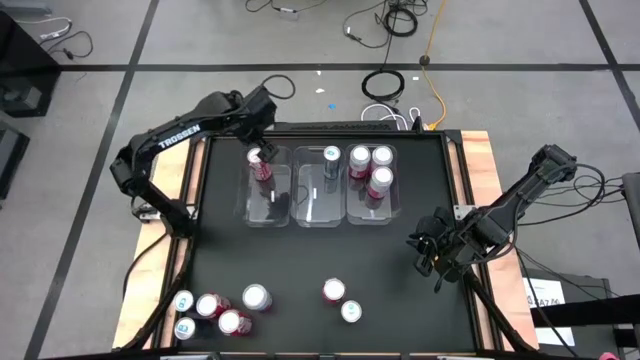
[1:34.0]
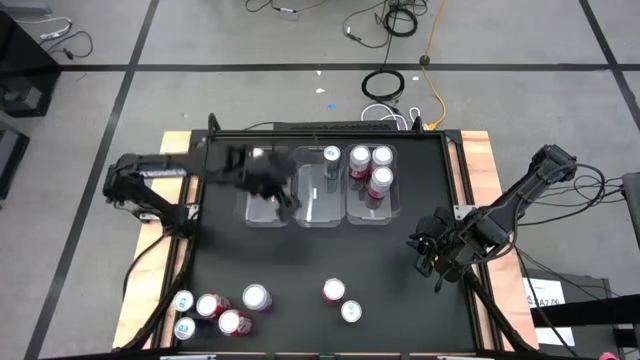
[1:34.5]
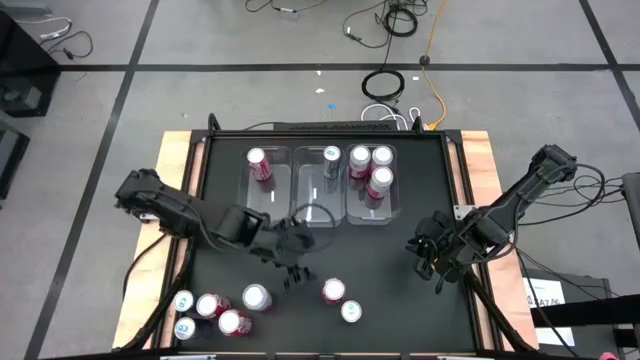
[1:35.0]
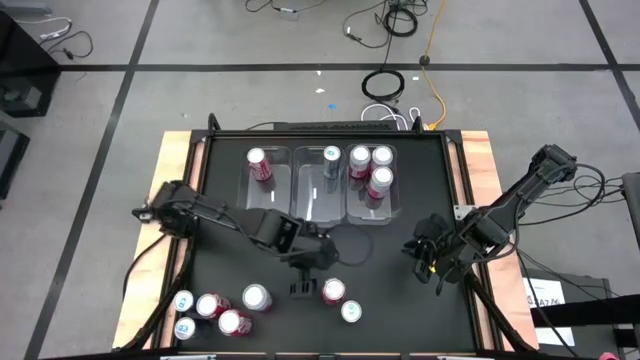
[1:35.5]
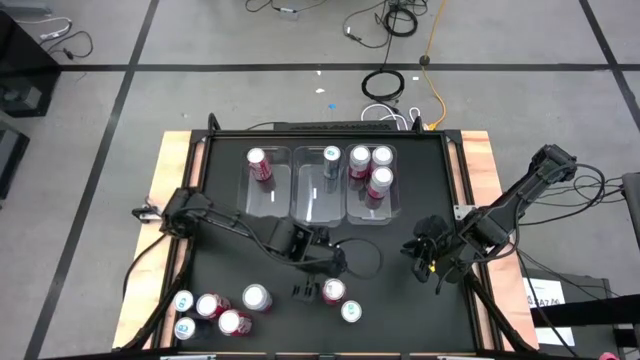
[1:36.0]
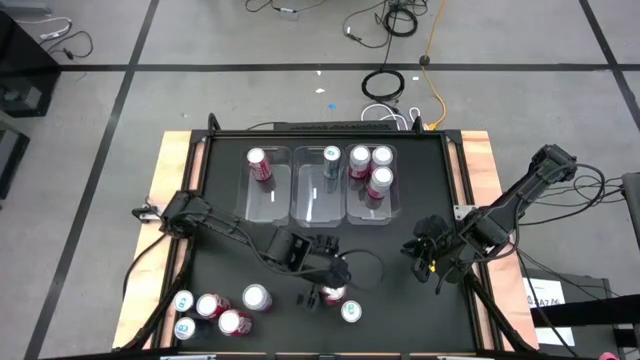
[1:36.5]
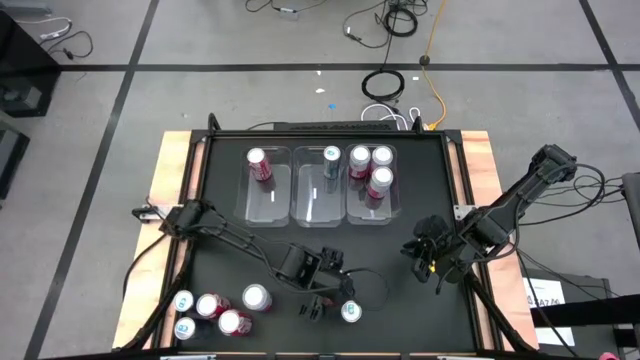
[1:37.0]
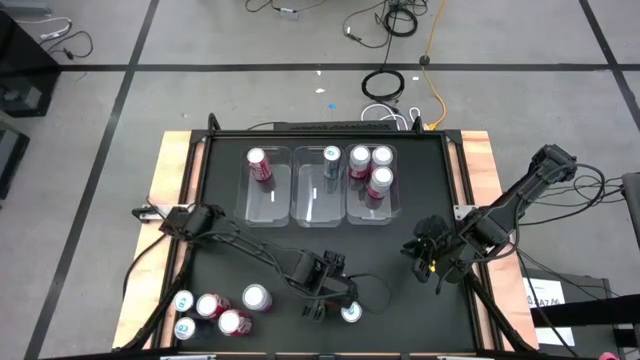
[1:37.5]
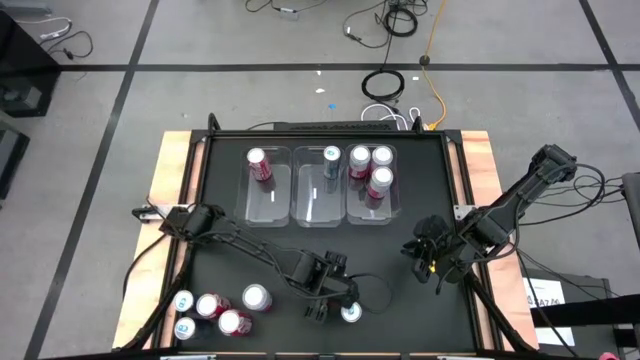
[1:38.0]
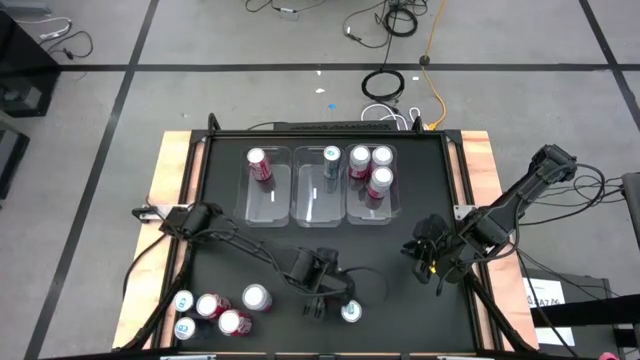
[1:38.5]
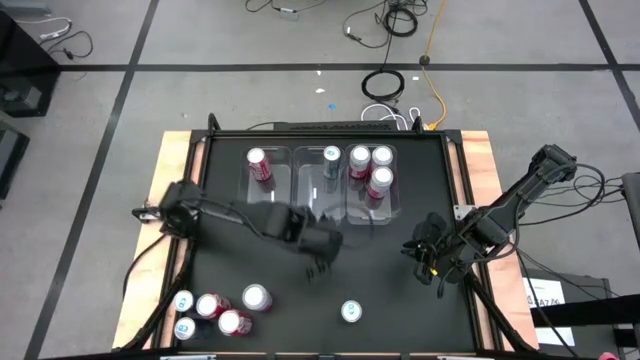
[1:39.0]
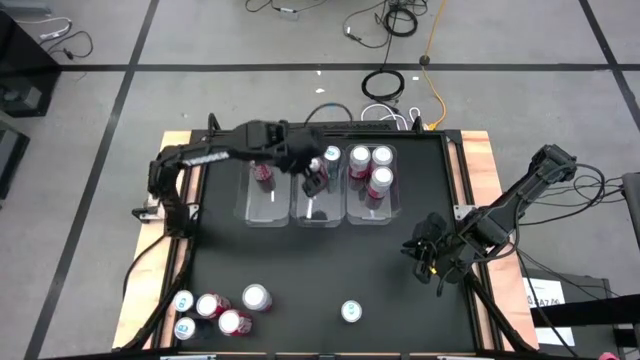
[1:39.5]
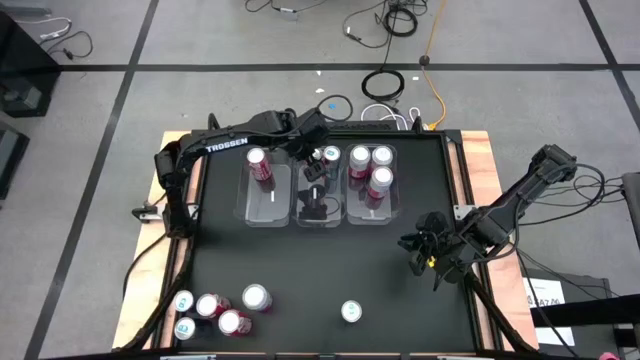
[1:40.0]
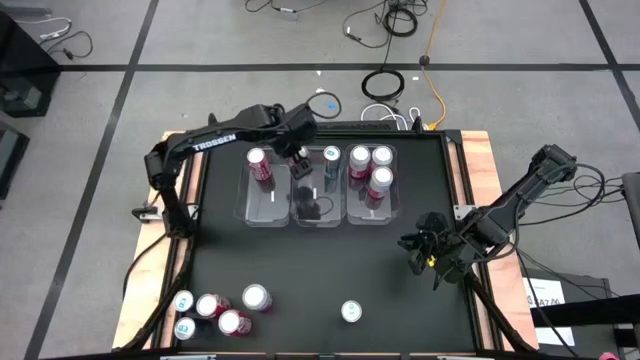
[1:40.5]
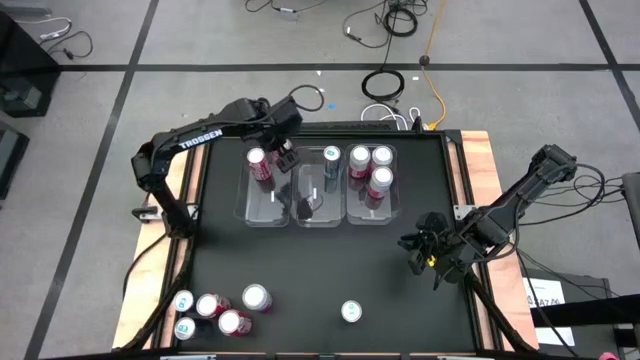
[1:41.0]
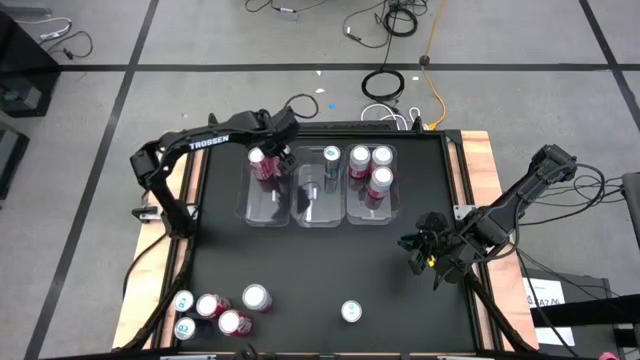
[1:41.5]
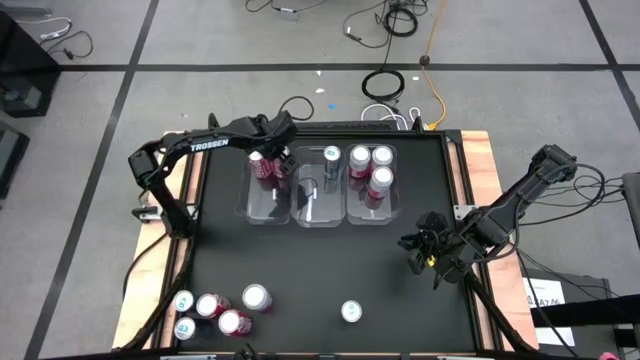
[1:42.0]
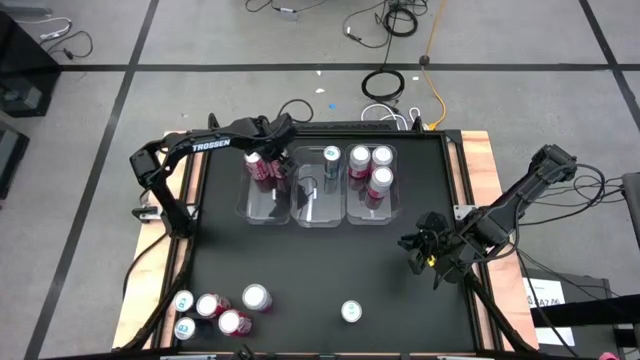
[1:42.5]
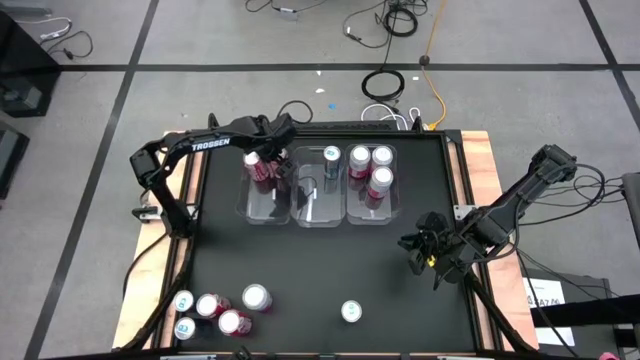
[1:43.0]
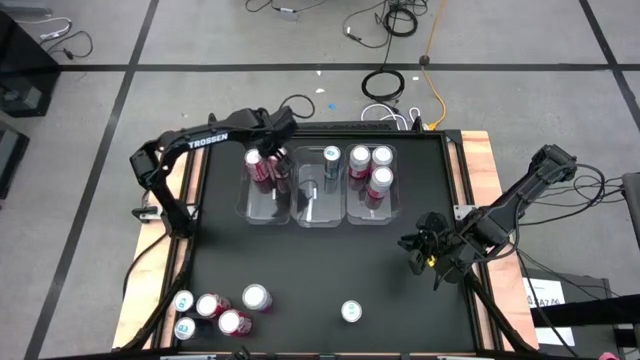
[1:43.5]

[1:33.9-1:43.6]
Task: Sort soda cans
Put the red soda can into the left transparent bin

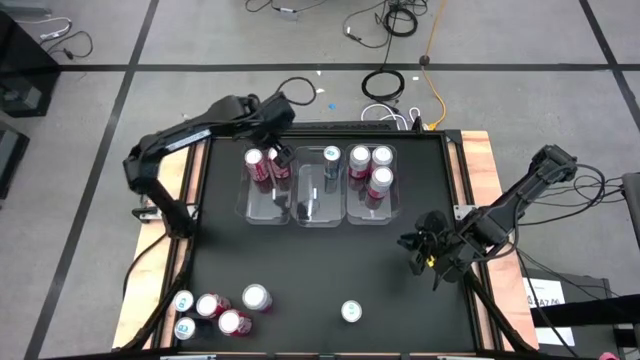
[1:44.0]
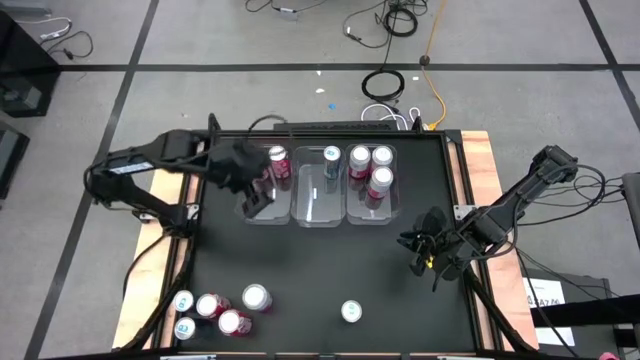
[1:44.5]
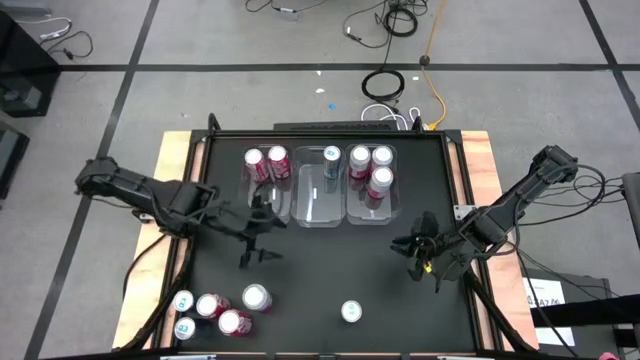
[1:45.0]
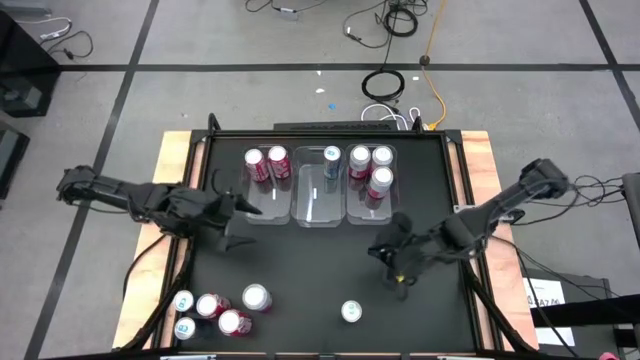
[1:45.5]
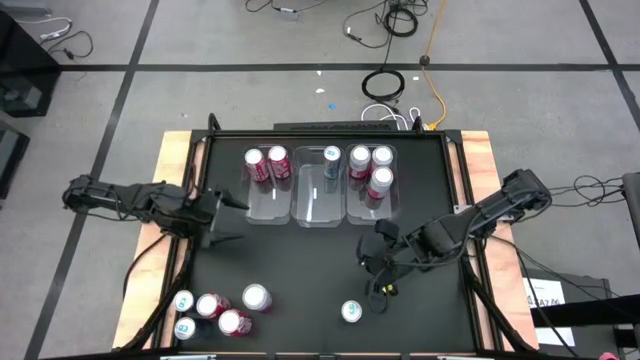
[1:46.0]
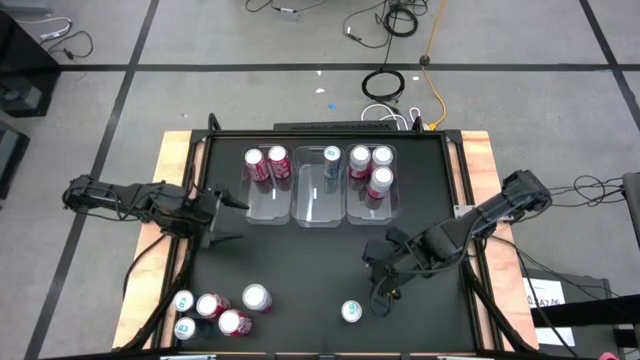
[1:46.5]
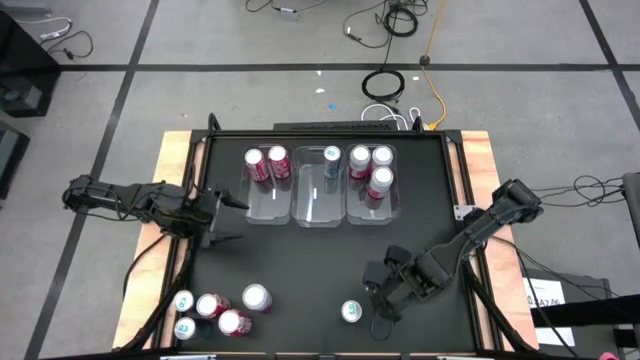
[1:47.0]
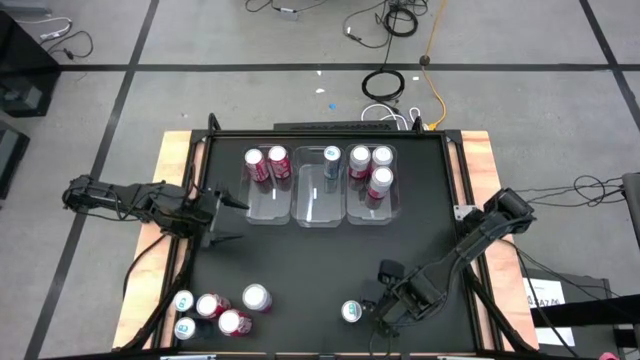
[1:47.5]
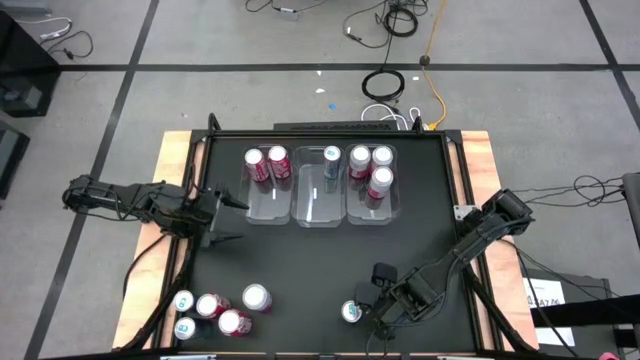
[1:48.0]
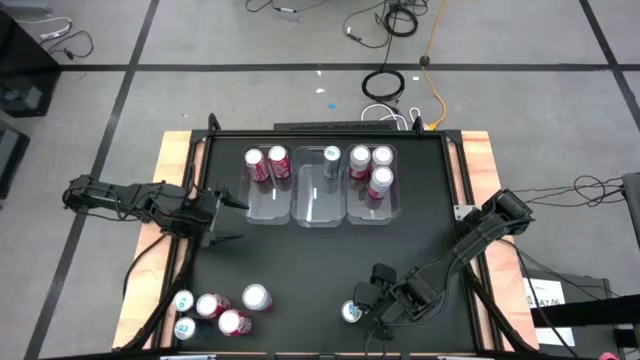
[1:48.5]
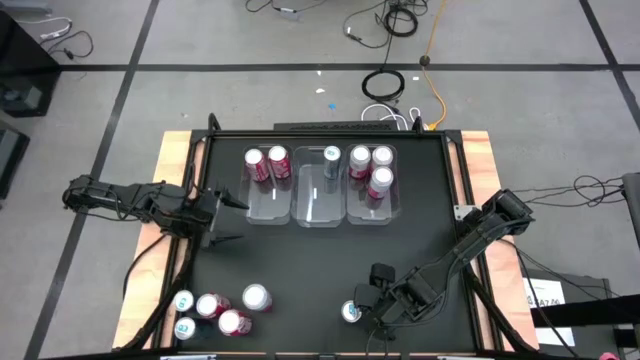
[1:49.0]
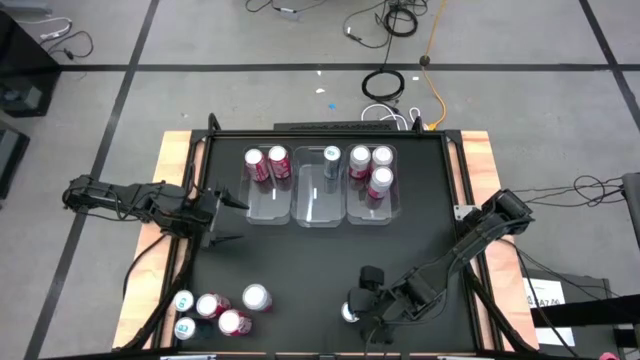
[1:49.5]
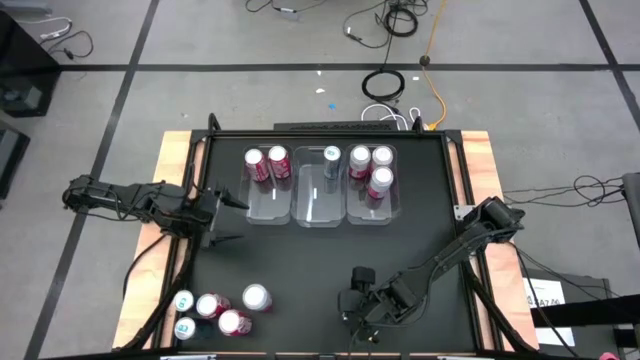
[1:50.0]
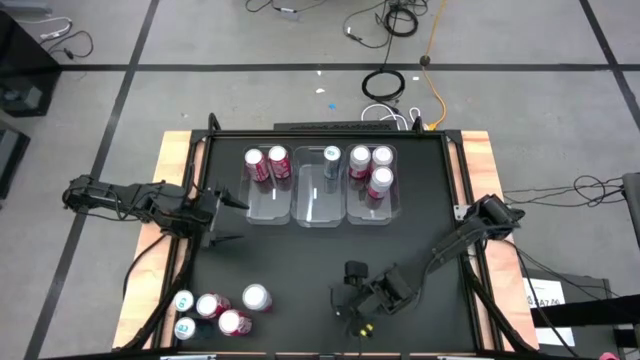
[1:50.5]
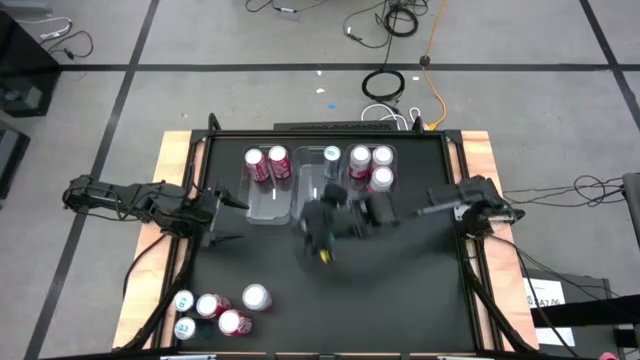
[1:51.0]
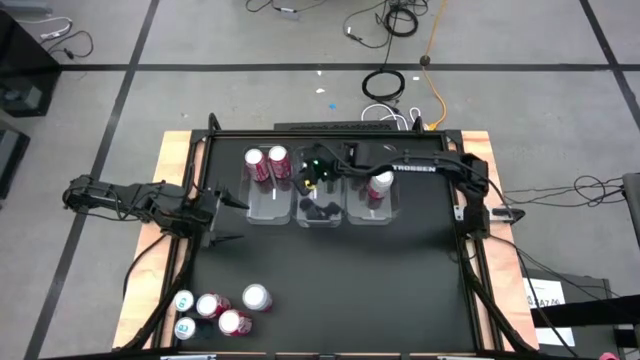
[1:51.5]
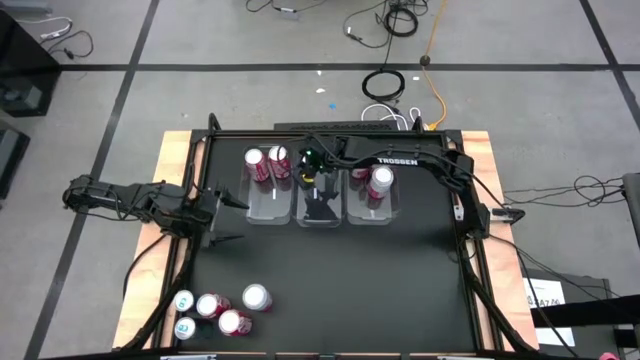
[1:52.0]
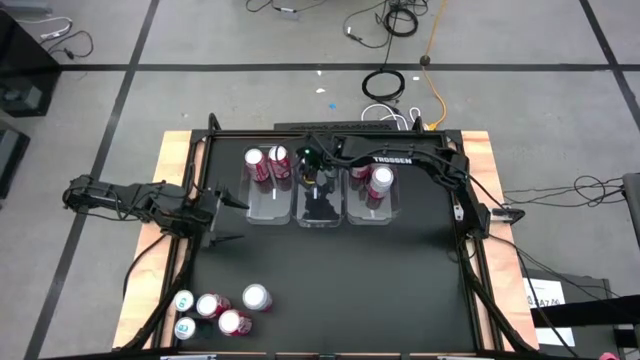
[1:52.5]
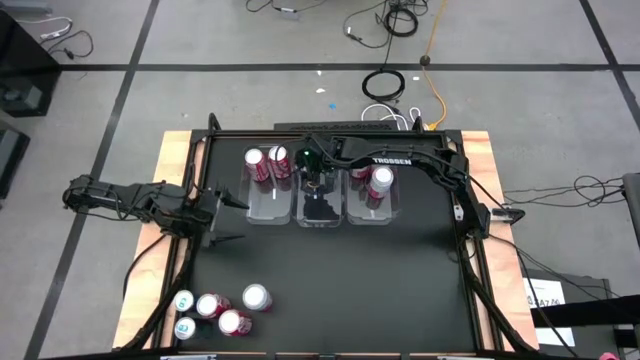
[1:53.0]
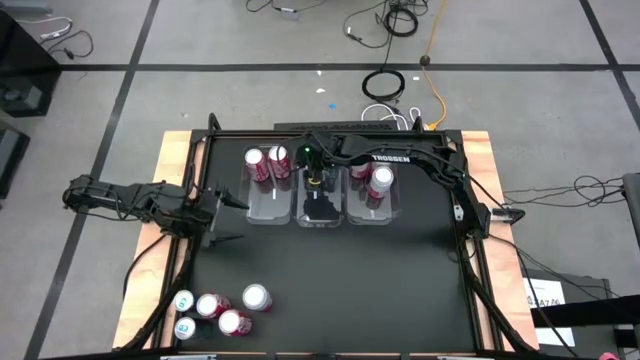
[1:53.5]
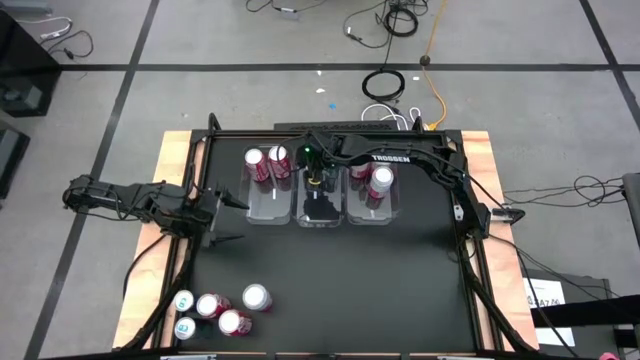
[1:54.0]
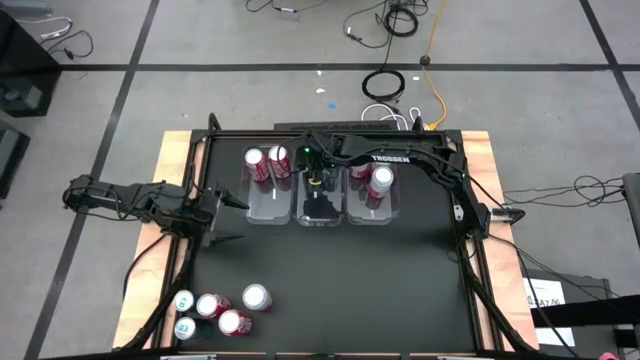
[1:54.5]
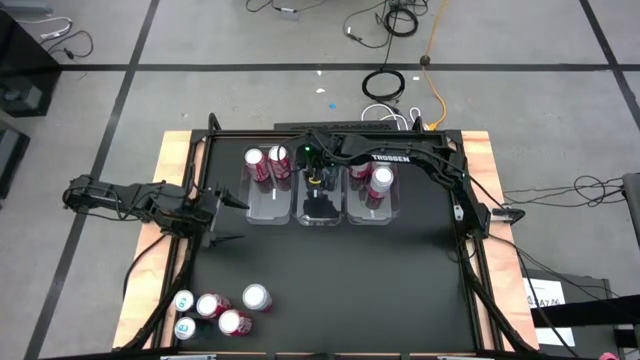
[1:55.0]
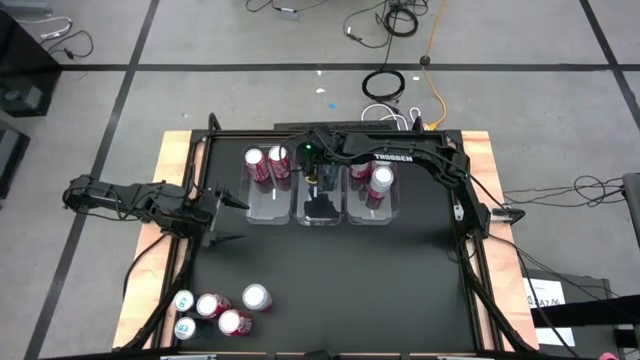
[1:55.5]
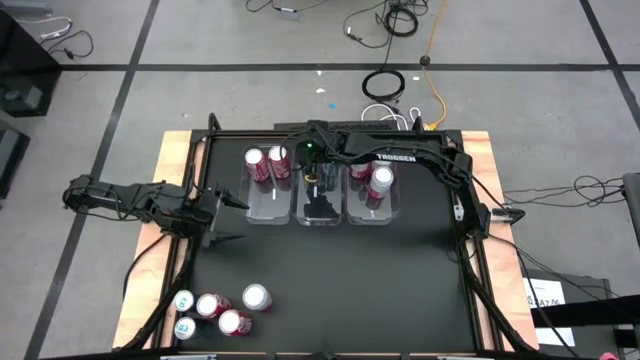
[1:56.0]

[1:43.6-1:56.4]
Put the blue soda can into the center transparent bin
